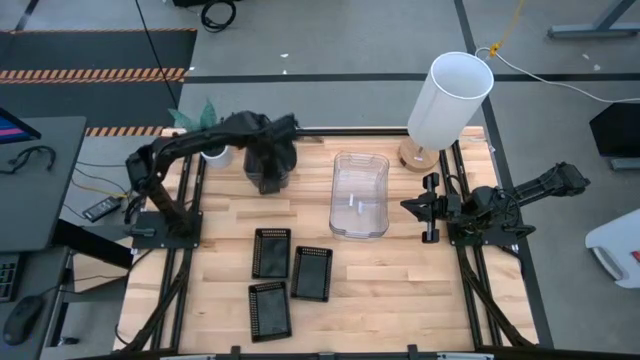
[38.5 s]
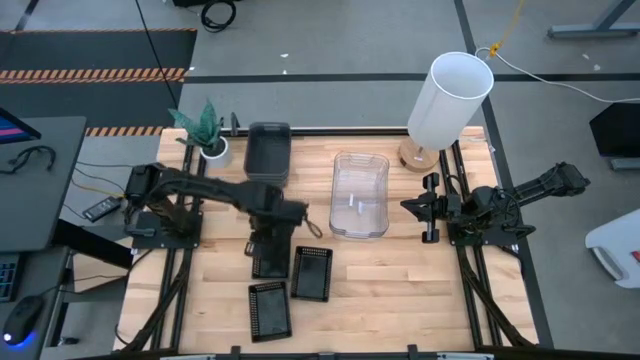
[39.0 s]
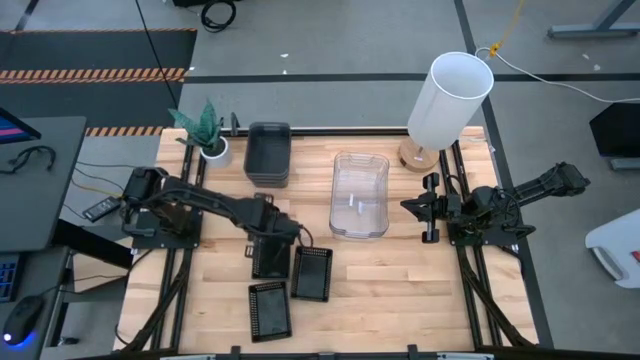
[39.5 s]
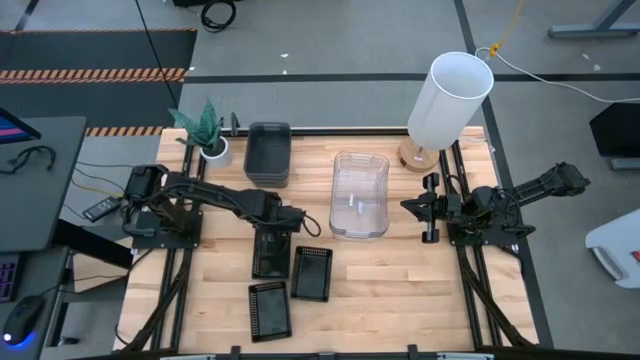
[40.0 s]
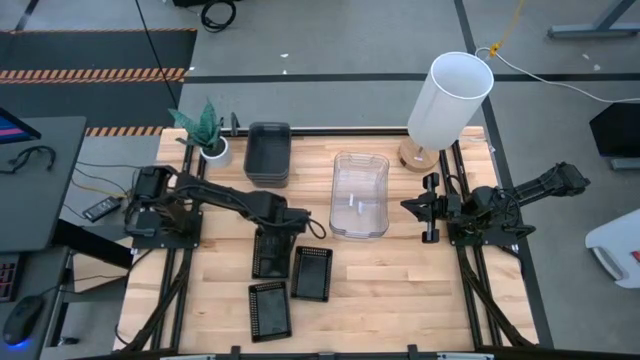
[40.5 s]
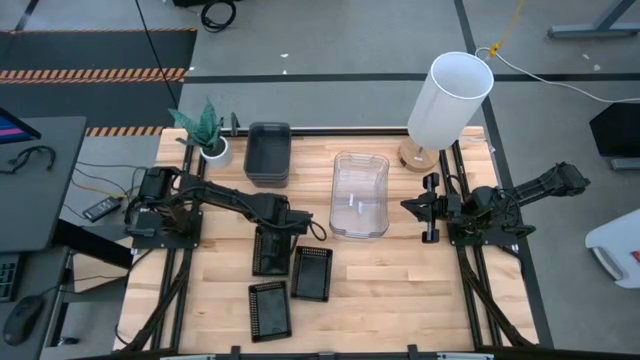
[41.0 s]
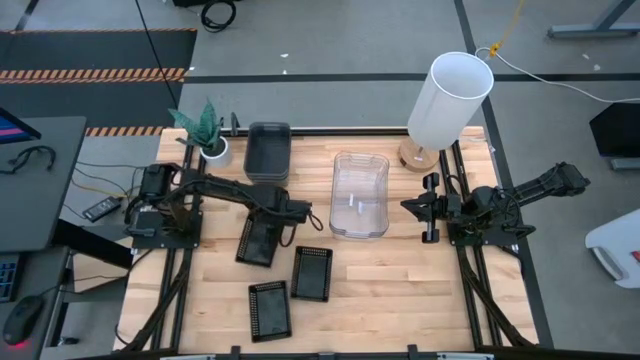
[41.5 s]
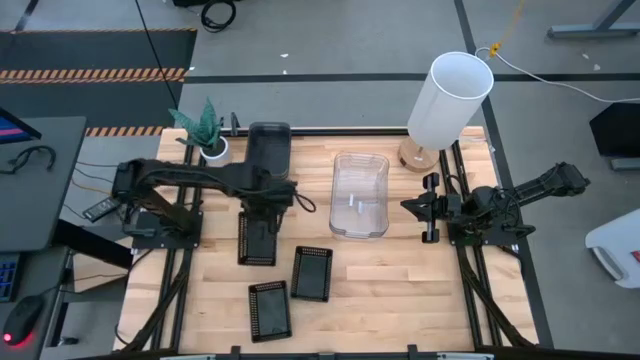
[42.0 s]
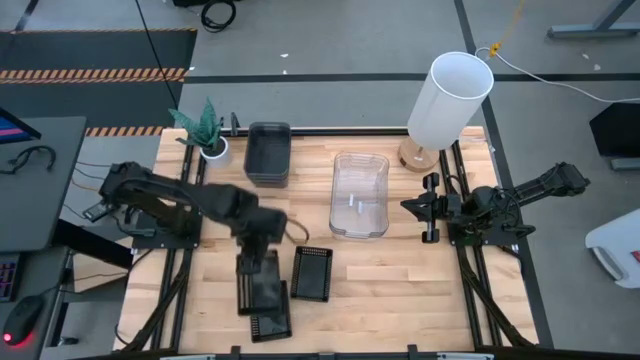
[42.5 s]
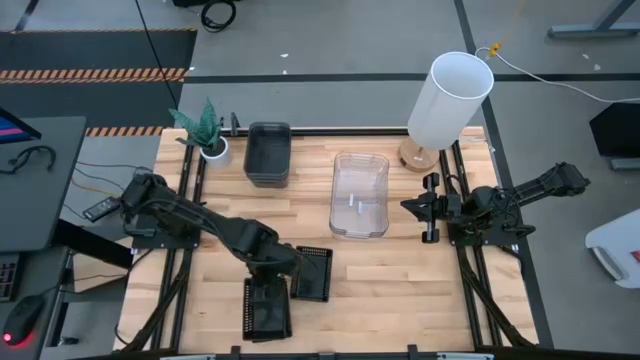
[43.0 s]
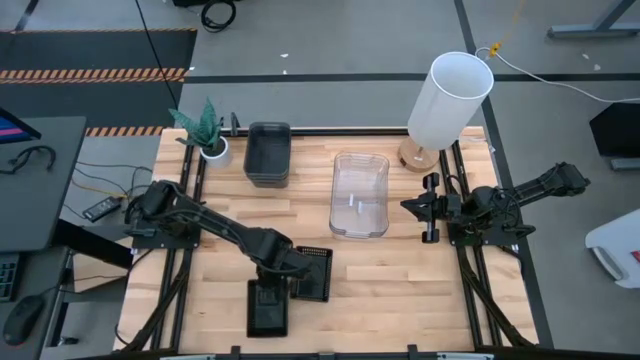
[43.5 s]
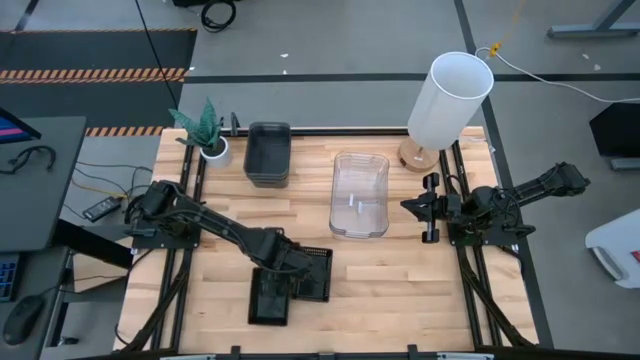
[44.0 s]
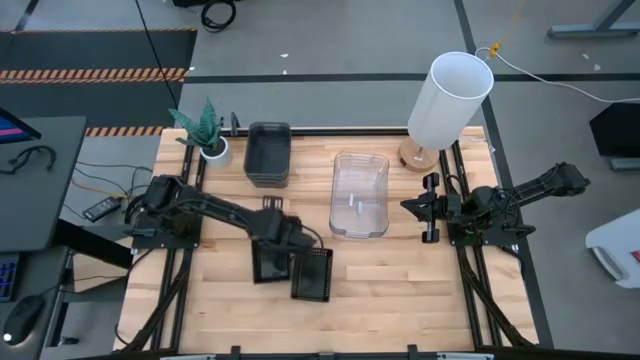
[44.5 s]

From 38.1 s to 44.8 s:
Stack the top left black bin on the bottom black bin

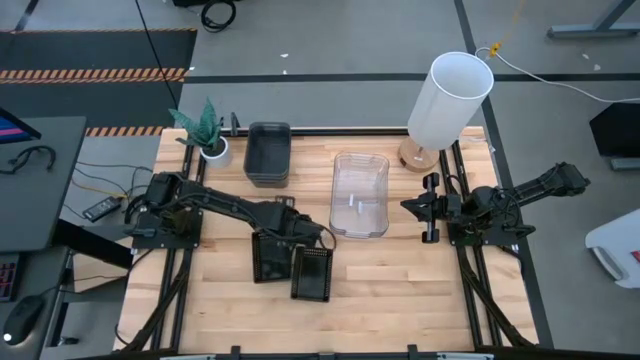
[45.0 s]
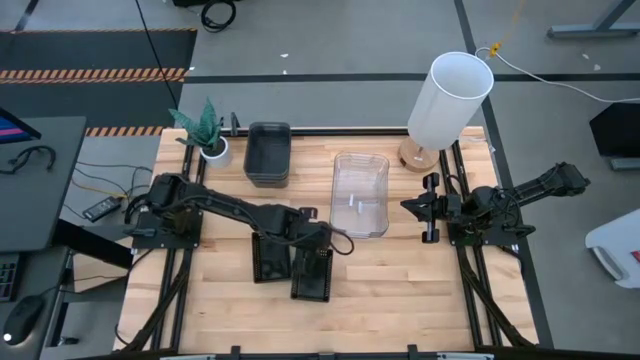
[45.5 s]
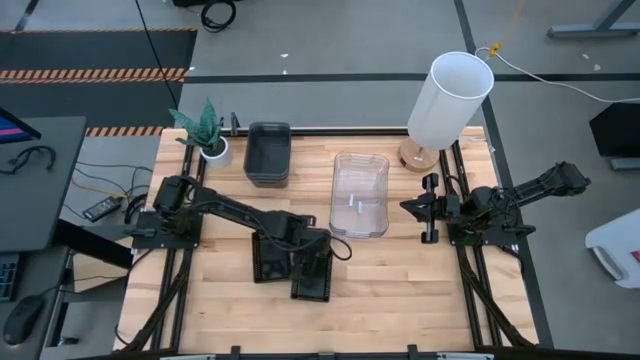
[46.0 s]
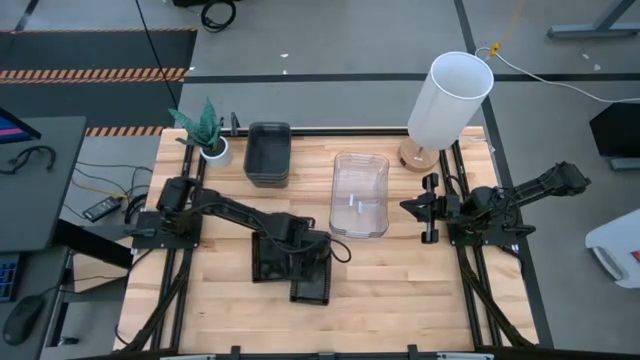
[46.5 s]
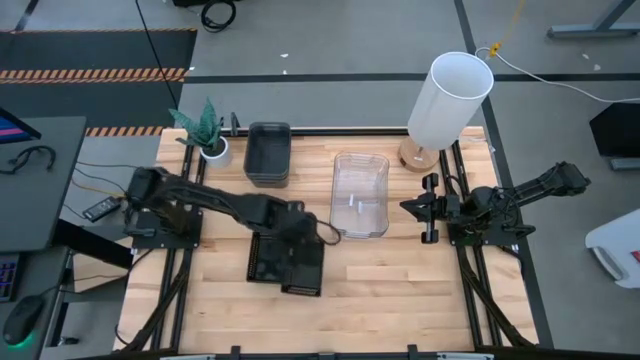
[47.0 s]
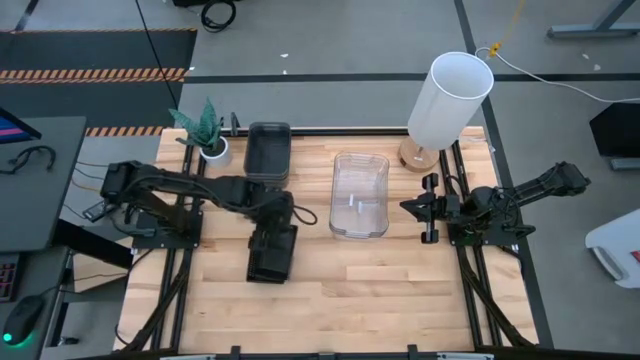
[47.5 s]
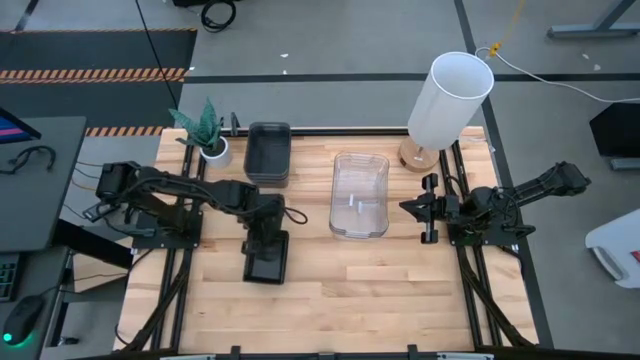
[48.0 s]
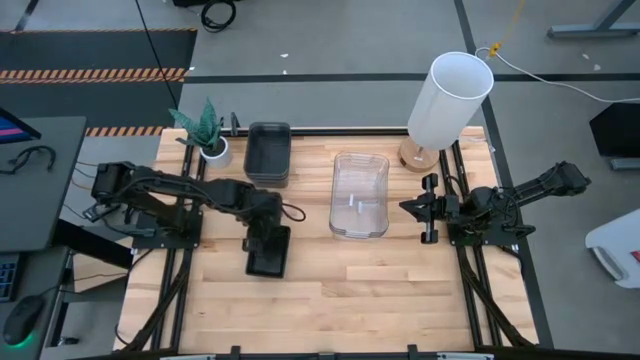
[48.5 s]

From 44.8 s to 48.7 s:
Stack the right black bin on the black bin

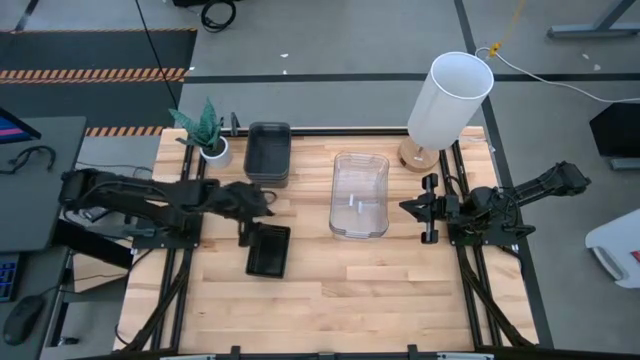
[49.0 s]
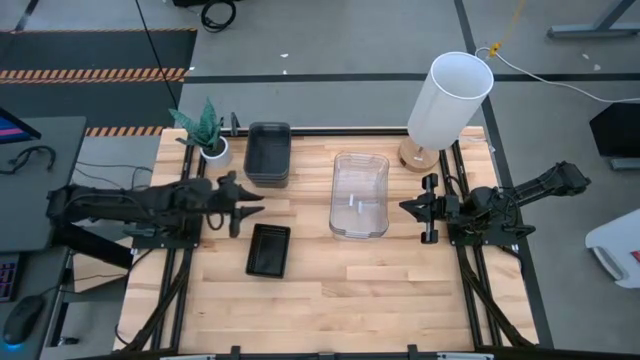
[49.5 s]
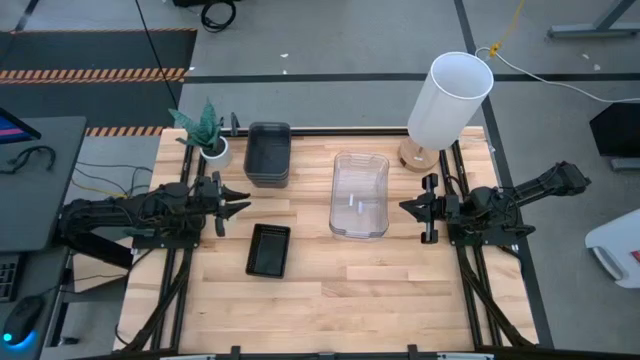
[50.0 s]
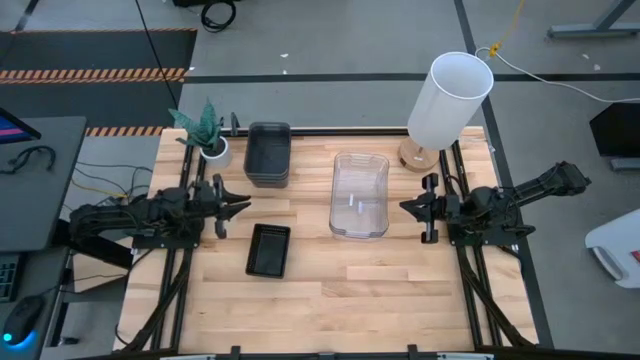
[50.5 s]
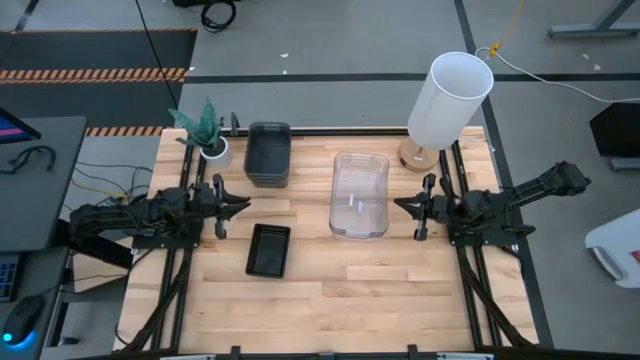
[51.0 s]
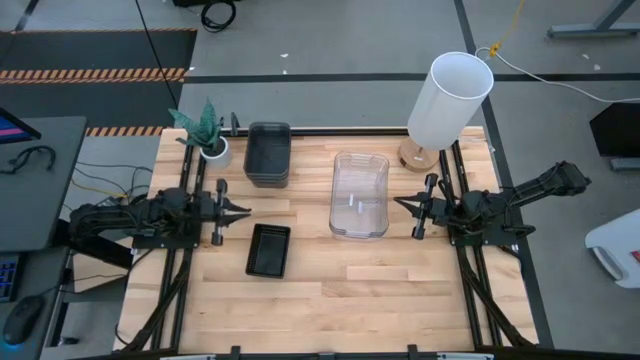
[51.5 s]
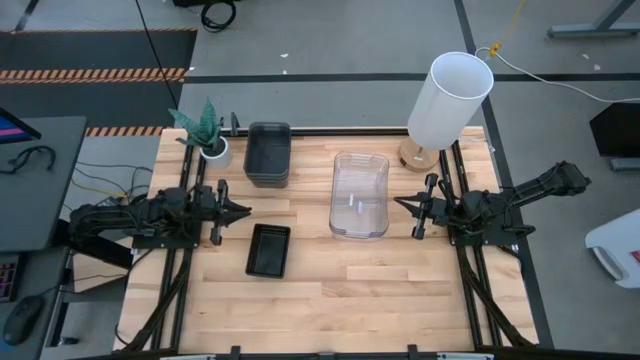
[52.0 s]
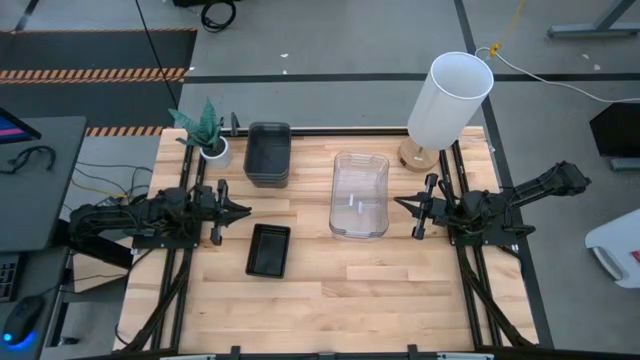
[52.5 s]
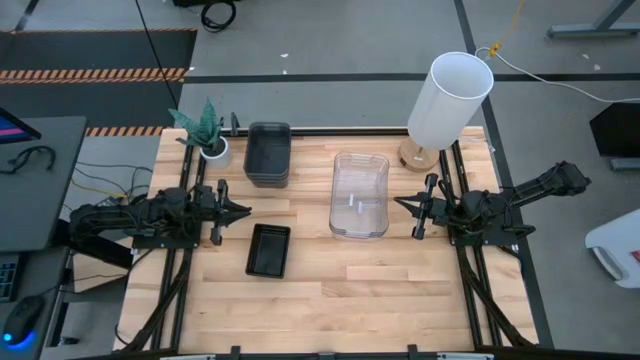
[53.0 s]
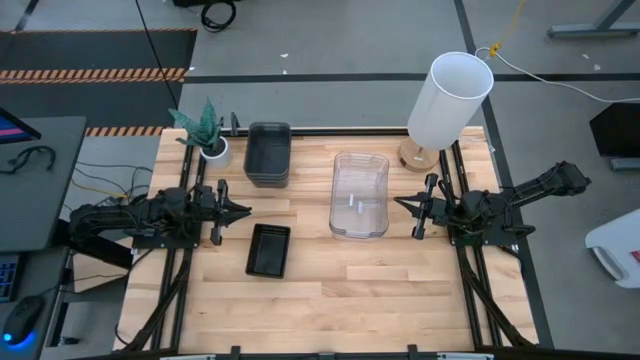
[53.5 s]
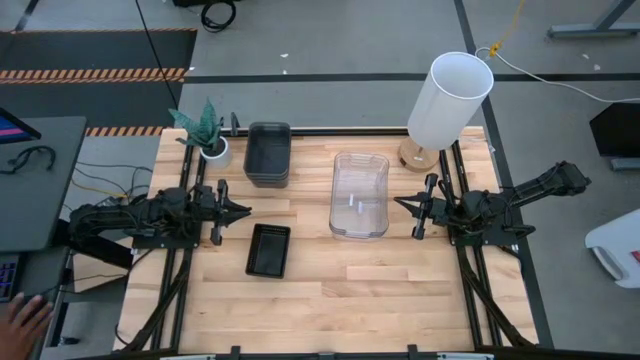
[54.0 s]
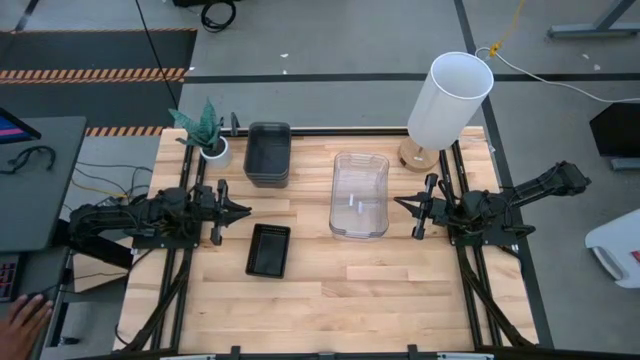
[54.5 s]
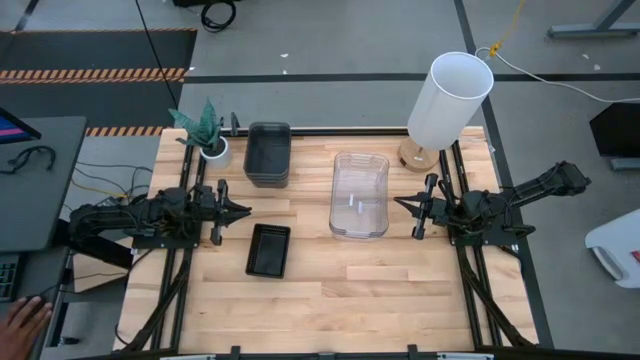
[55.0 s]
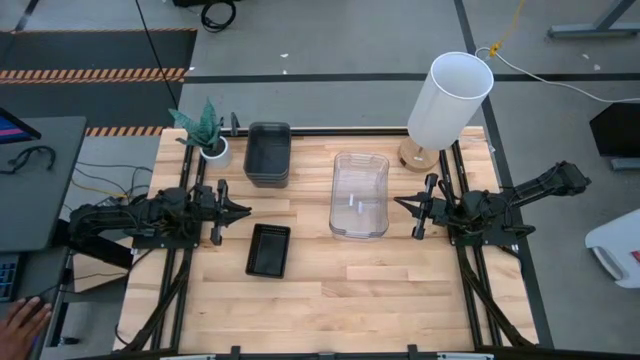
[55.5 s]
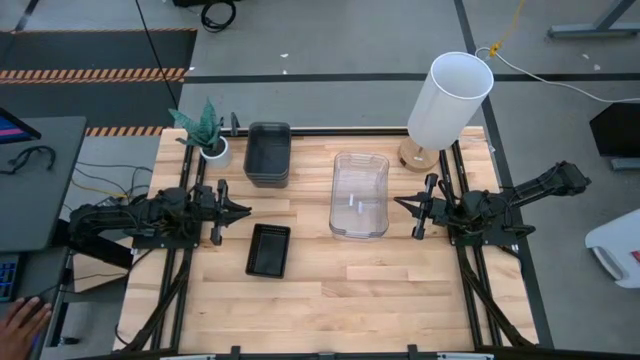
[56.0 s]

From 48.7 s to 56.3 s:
Return to Home Position
